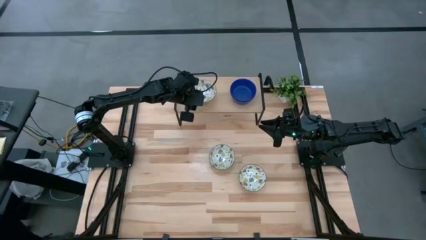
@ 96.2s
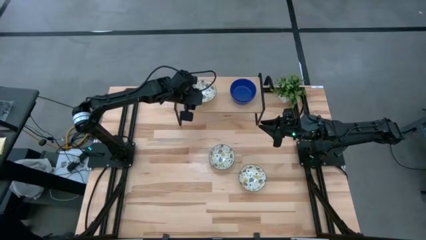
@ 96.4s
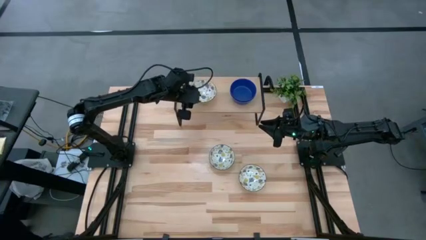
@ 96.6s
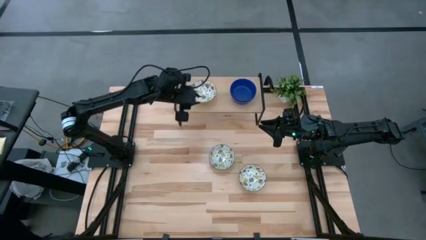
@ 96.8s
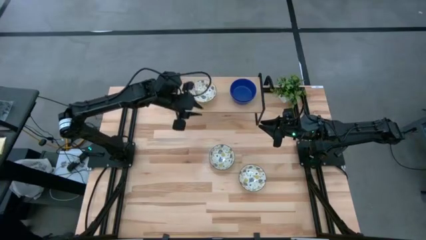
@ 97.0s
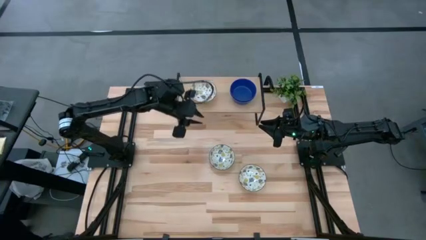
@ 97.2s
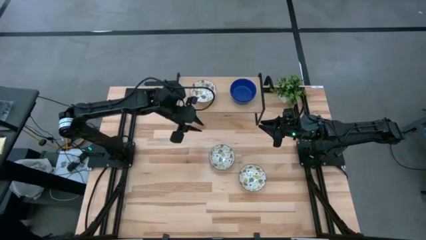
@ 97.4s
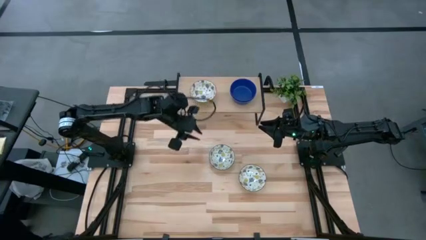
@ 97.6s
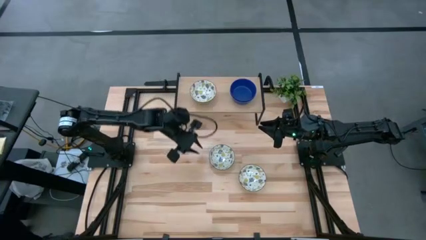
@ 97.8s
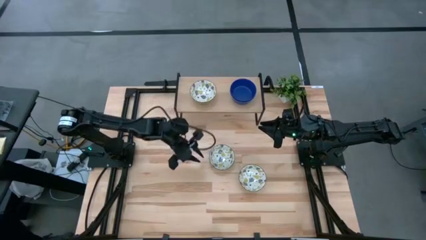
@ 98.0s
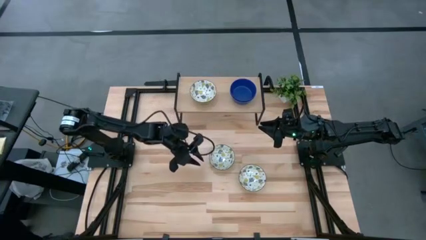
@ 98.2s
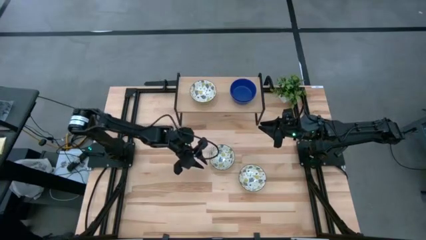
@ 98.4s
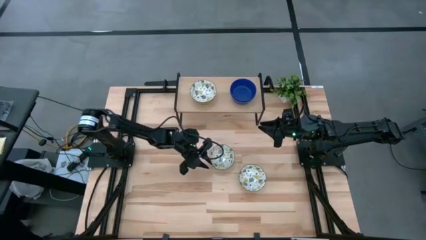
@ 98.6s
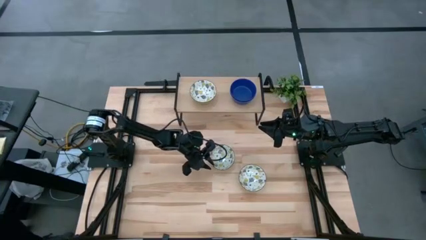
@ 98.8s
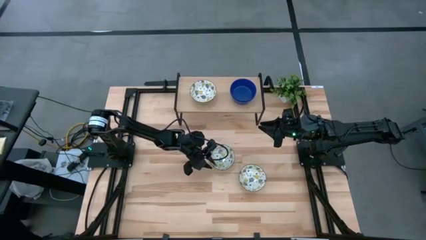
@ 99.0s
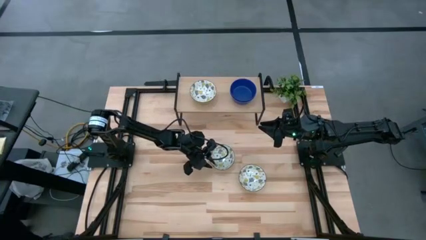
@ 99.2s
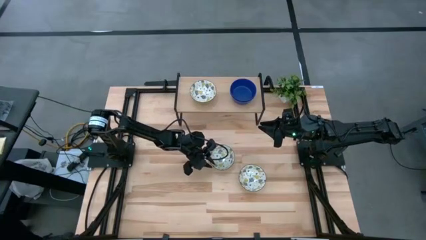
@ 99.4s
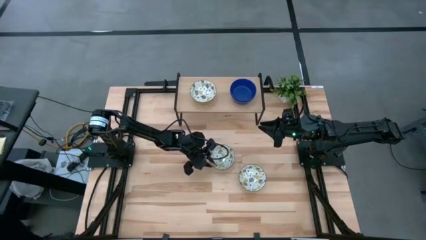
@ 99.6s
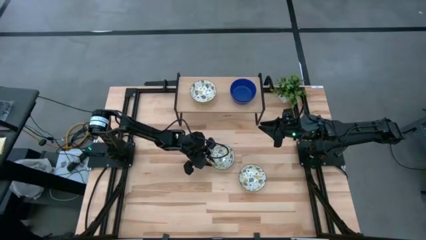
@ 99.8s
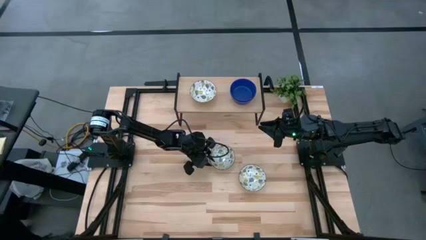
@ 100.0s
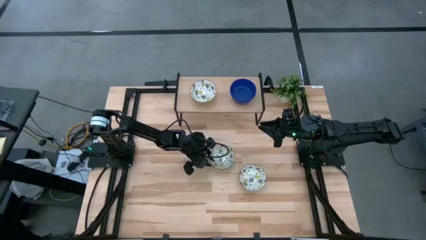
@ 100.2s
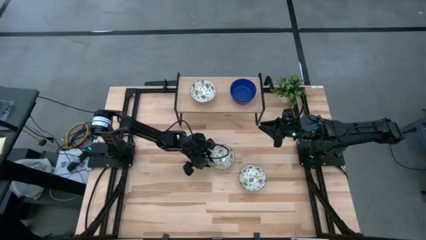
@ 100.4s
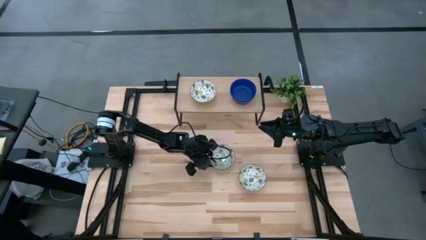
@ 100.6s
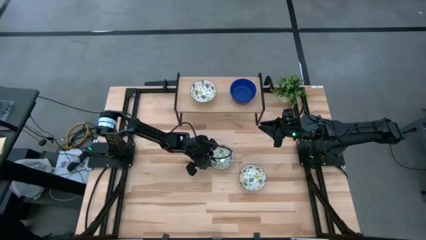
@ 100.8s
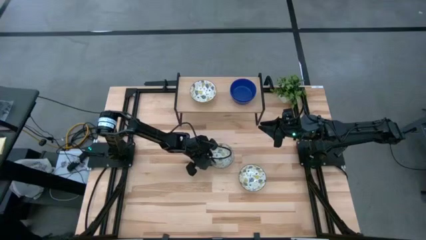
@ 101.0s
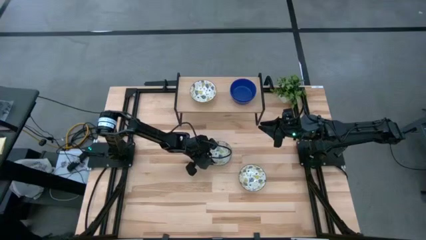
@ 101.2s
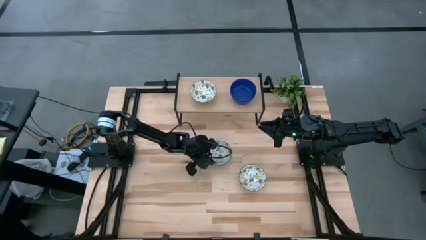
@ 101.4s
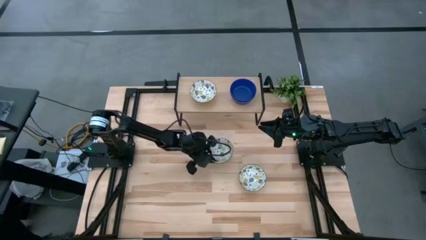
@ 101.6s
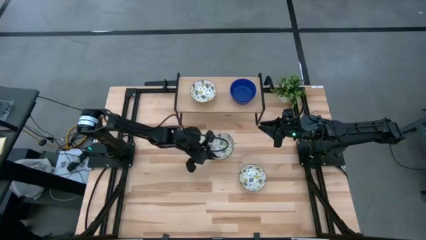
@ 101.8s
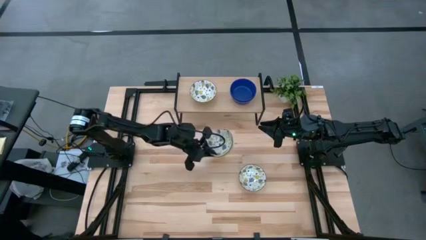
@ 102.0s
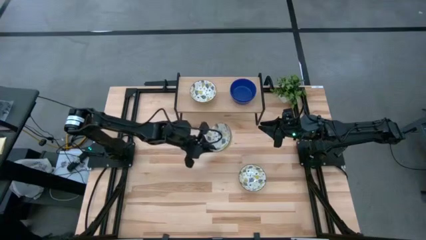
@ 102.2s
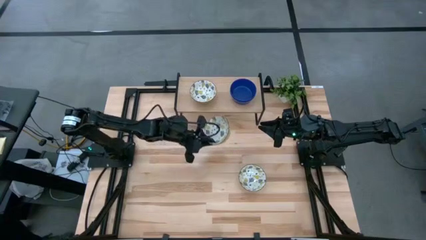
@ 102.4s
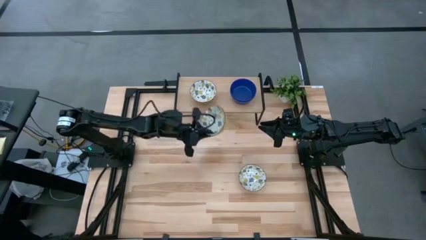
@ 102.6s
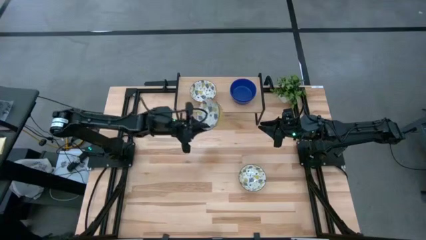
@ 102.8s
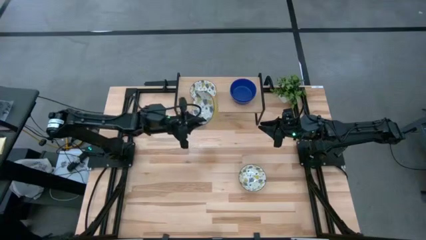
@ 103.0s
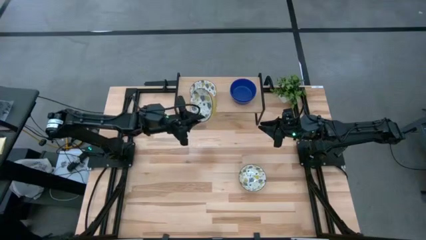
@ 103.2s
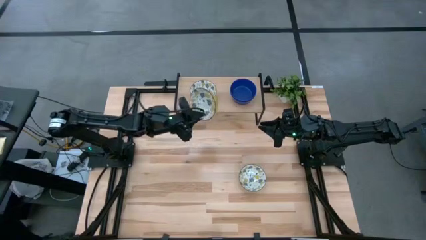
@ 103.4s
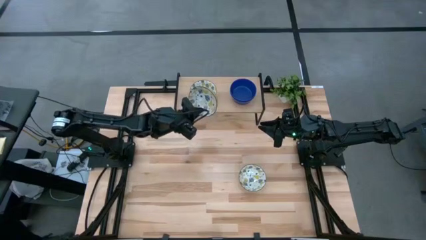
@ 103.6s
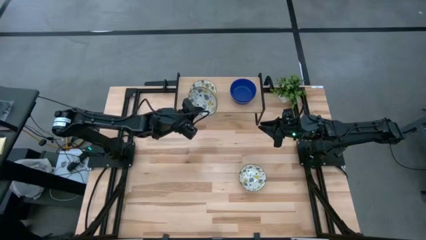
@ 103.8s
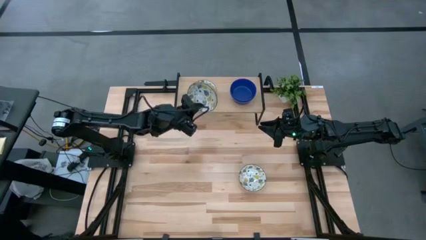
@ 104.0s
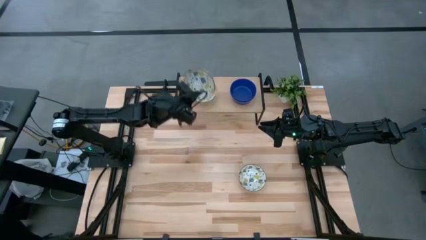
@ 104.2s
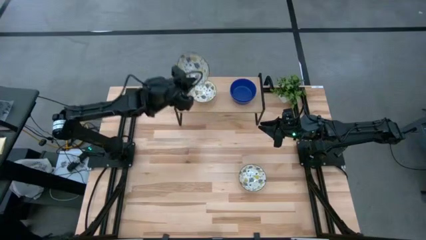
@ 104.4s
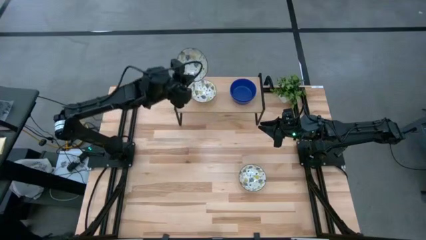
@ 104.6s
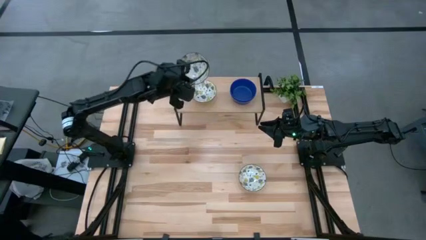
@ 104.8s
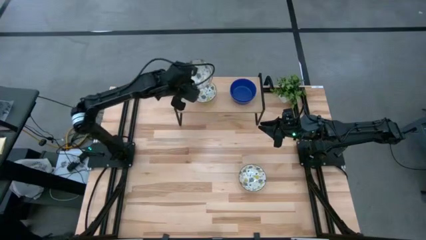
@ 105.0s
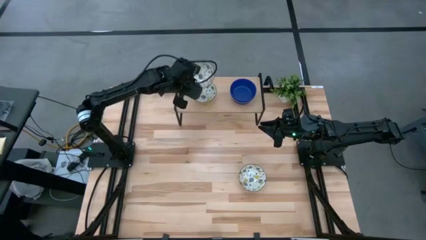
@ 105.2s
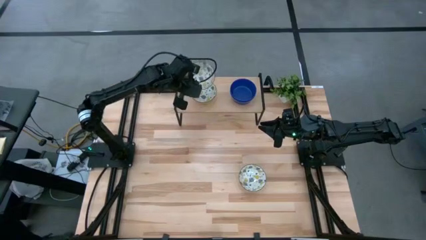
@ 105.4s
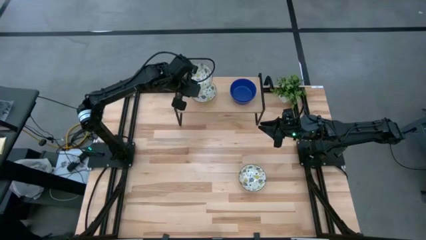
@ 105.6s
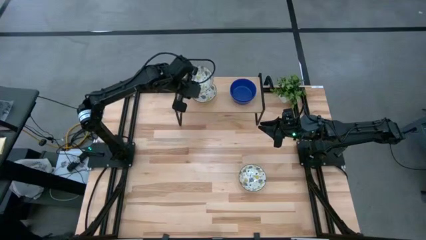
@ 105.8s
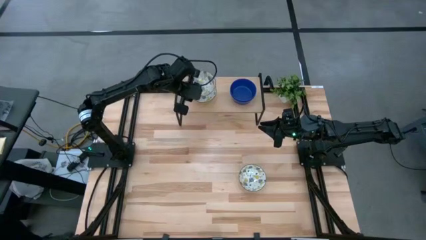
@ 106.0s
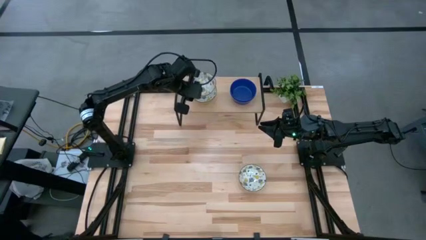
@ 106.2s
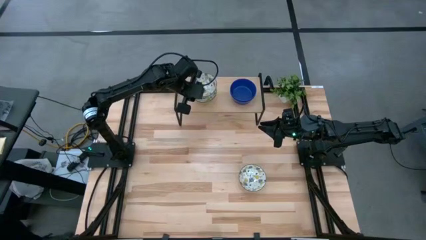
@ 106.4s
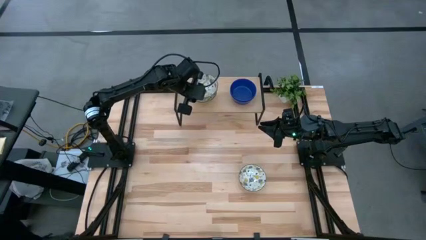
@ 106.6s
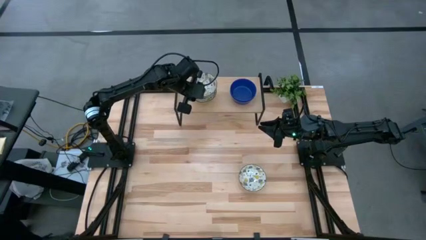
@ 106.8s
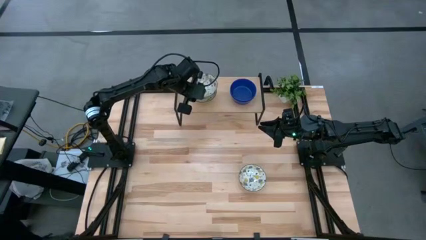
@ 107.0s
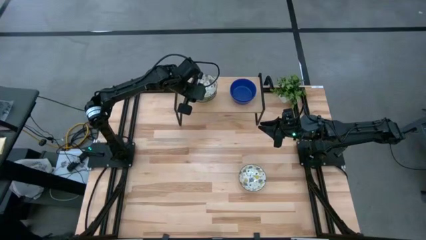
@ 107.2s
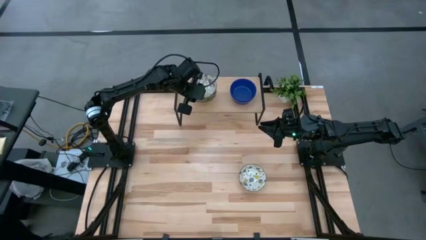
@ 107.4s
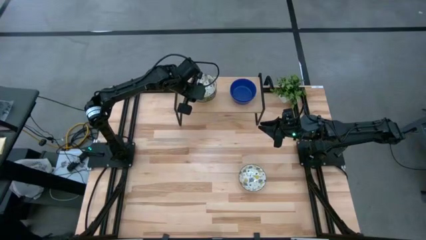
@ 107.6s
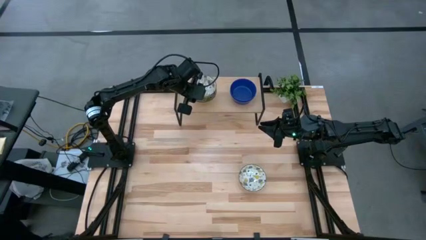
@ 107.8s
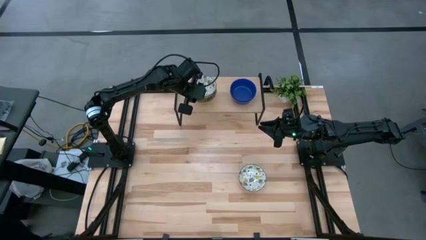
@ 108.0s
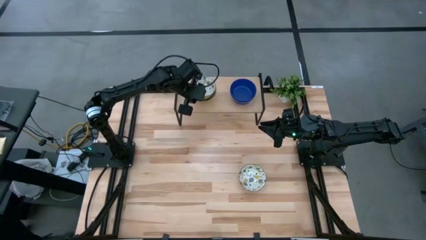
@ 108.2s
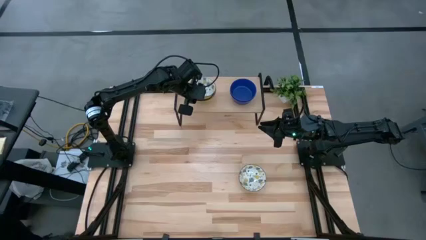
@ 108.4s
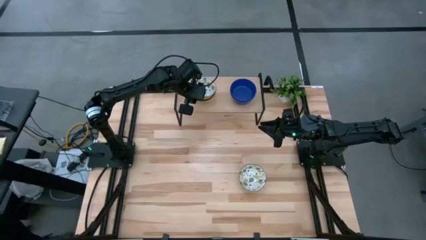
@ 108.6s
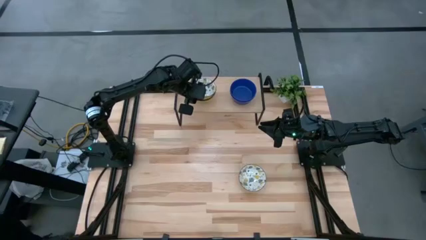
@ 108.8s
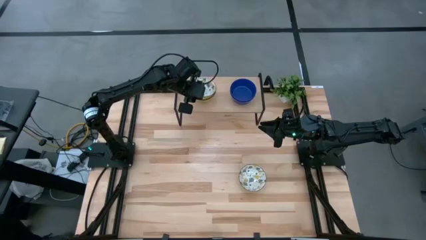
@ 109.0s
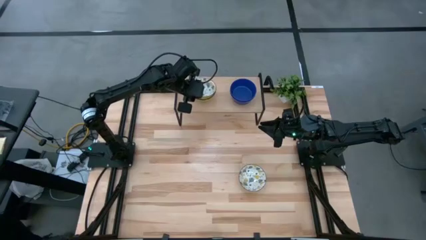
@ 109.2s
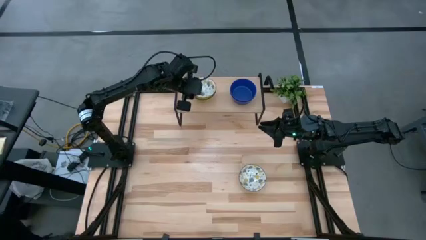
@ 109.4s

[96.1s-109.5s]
Task: Pick & Place Mini bowls
Stack the top white patterned bowl on top of the white patterned bowl on the shelf

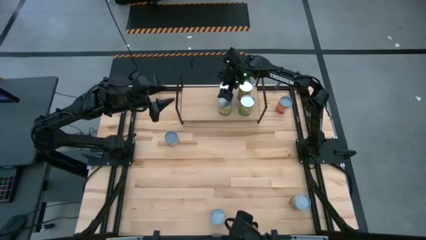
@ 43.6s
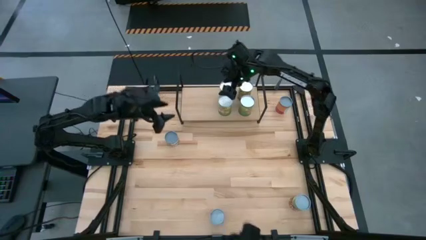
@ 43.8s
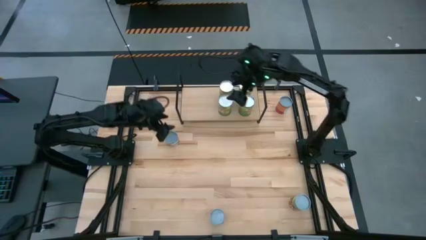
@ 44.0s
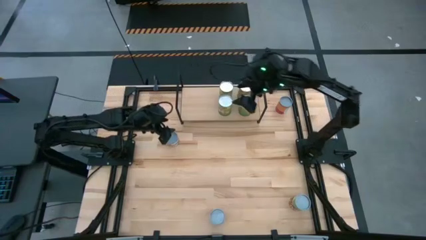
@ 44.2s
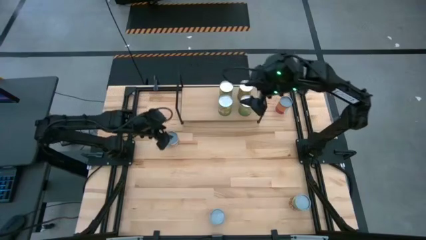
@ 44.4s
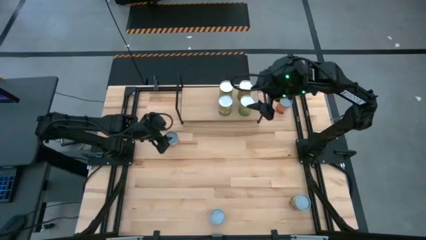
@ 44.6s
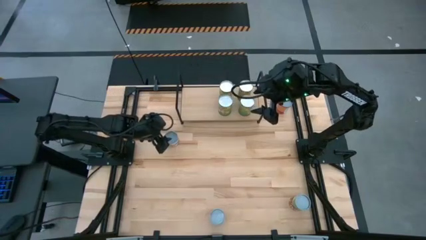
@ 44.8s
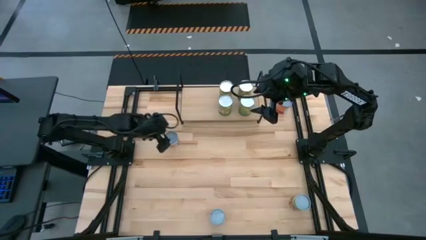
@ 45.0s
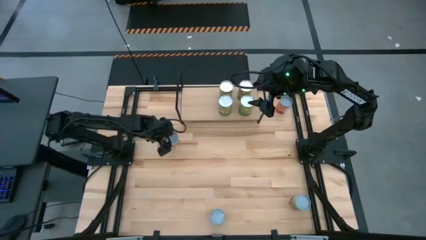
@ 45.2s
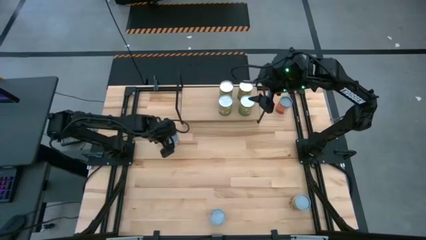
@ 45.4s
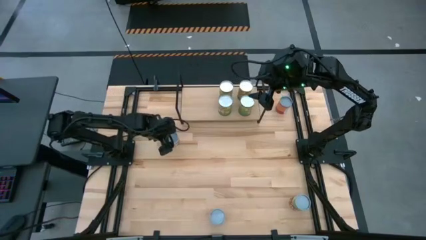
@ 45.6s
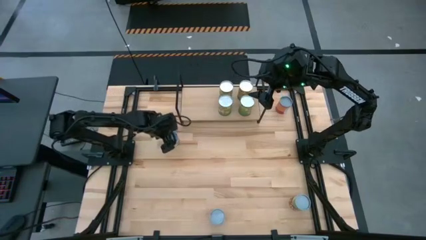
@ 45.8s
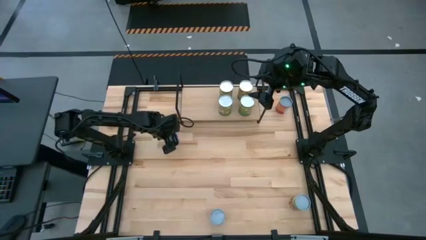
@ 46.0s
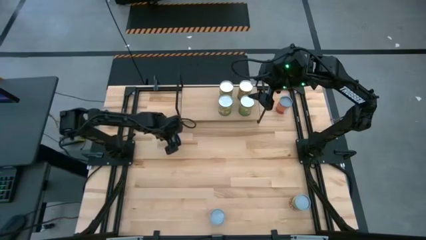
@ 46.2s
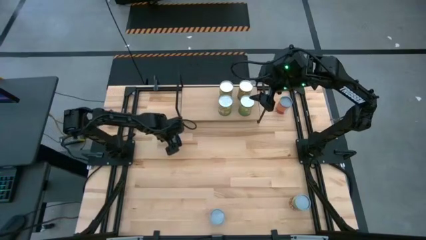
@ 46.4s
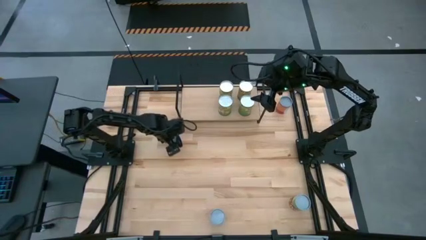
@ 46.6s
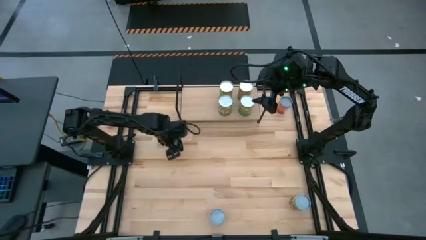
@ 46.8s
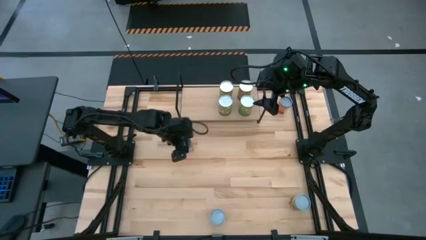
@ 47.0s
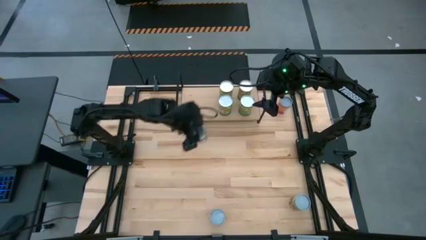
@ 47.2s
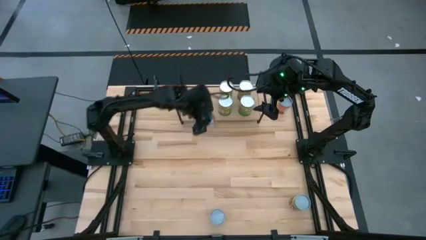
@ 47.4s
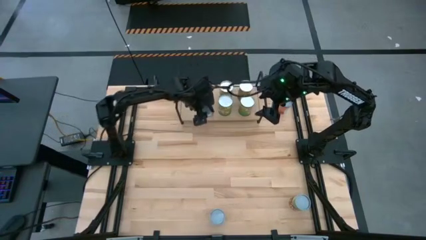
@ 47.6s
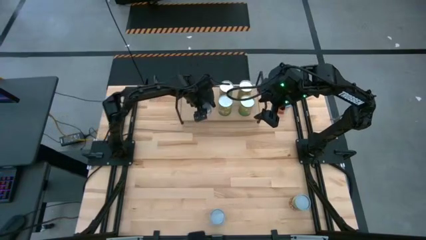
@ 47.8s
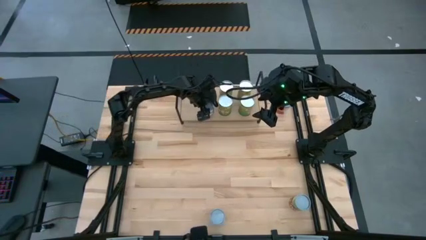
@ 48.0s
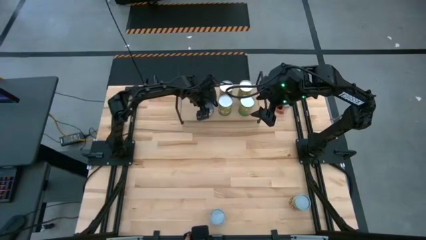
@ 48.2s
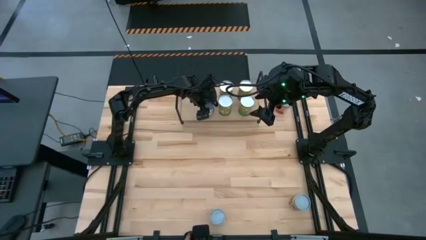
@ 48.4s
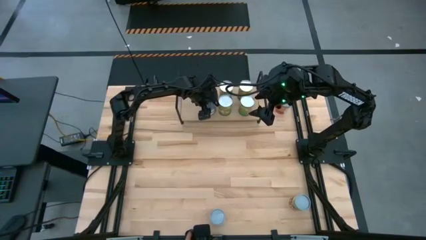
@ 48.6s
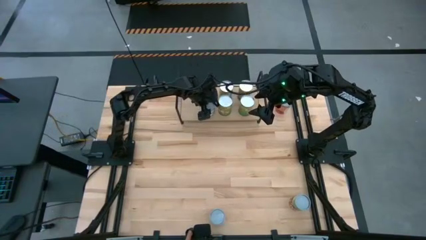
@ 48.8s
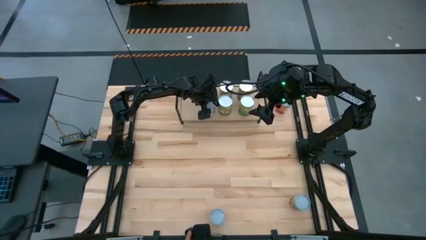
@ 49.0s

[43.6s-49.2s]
Task: Pick and place cans onto a shelf
Put the small canned oranges on the shelf
